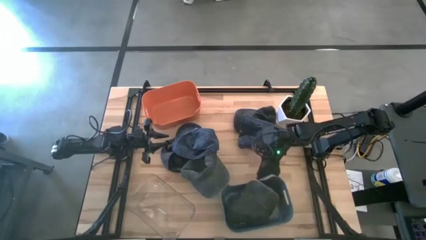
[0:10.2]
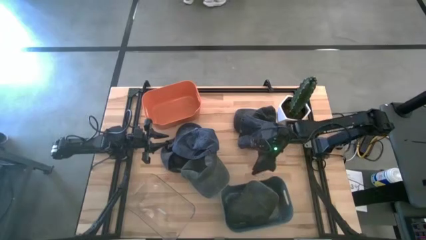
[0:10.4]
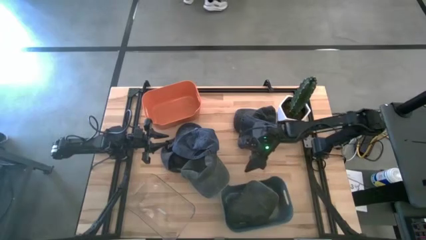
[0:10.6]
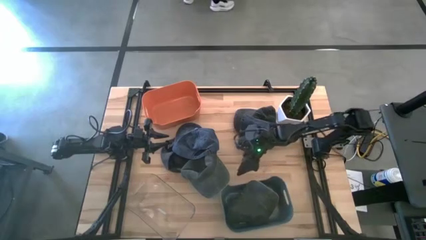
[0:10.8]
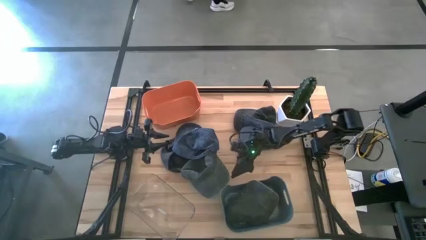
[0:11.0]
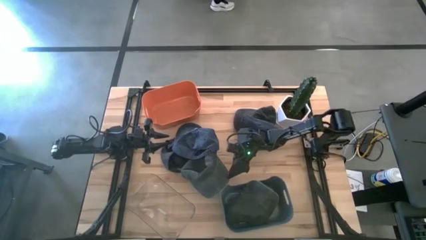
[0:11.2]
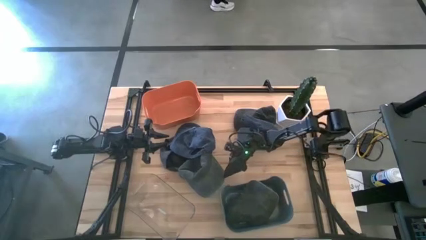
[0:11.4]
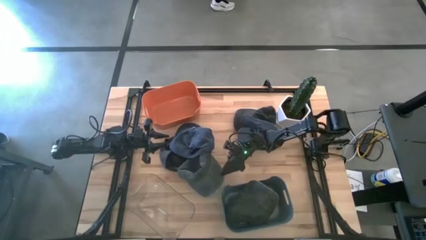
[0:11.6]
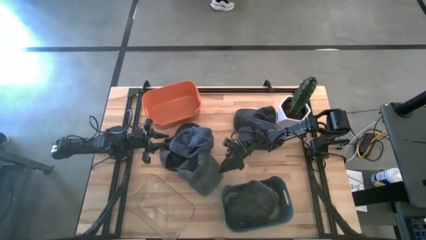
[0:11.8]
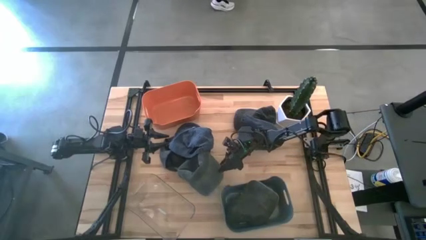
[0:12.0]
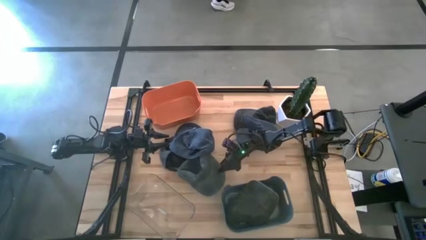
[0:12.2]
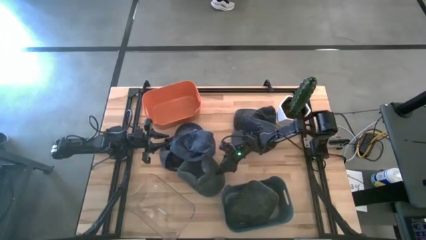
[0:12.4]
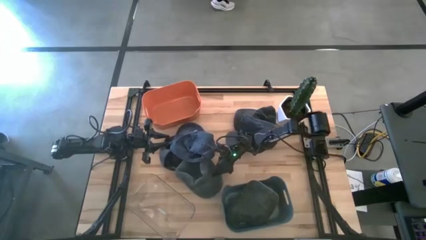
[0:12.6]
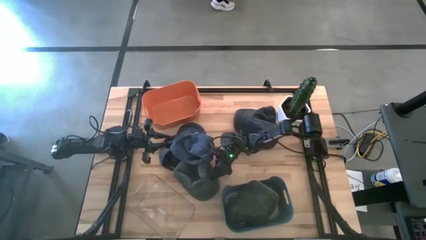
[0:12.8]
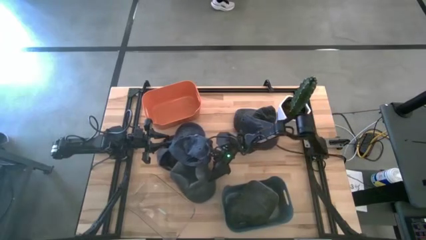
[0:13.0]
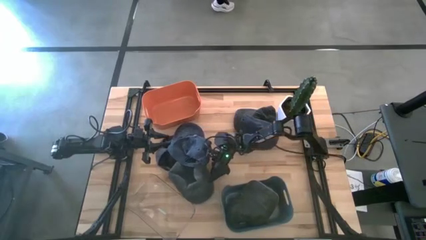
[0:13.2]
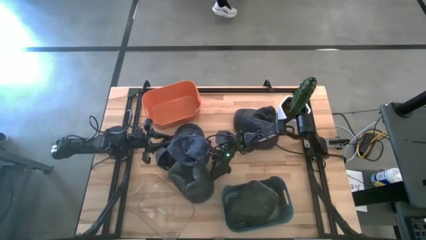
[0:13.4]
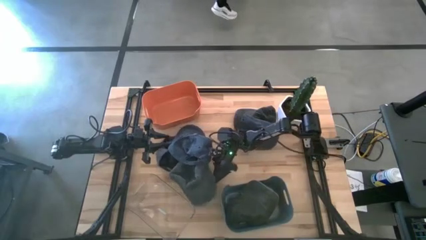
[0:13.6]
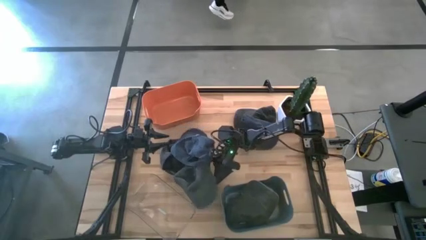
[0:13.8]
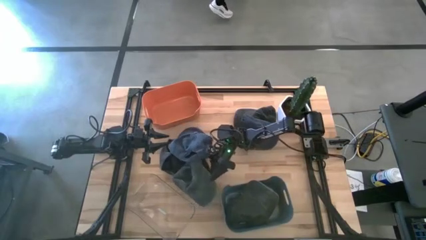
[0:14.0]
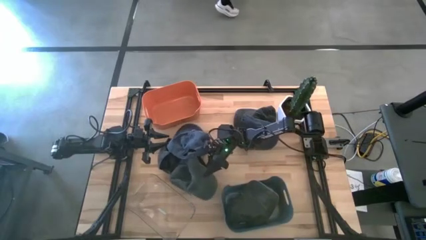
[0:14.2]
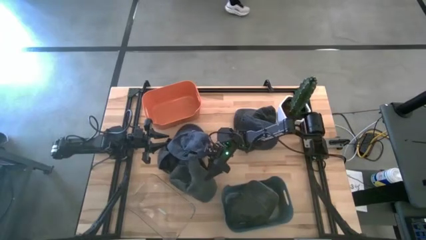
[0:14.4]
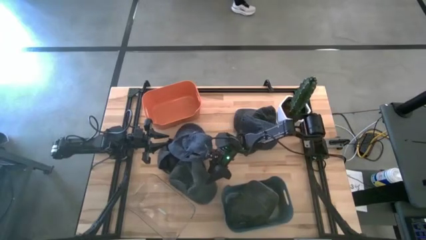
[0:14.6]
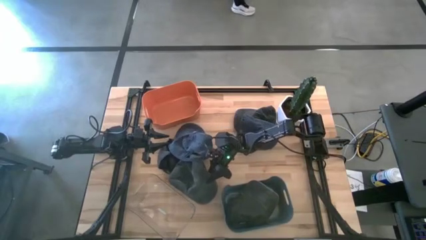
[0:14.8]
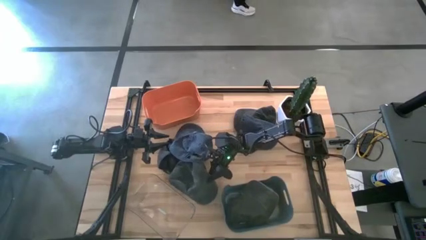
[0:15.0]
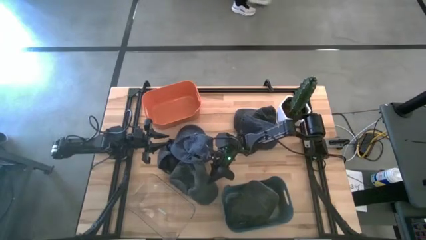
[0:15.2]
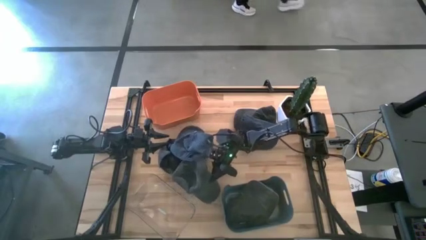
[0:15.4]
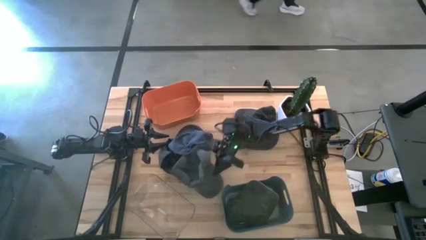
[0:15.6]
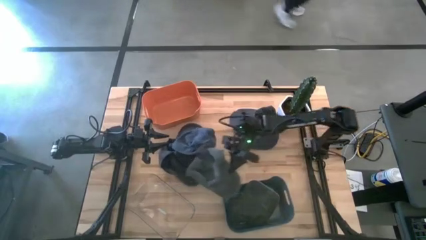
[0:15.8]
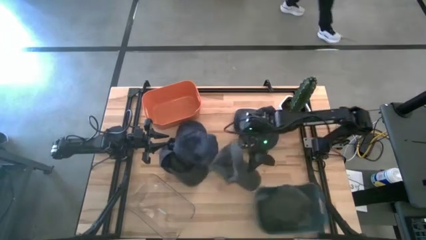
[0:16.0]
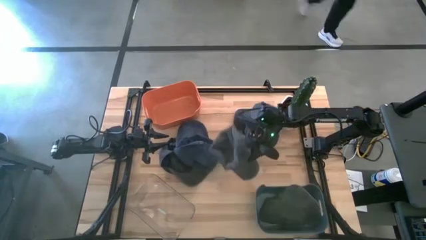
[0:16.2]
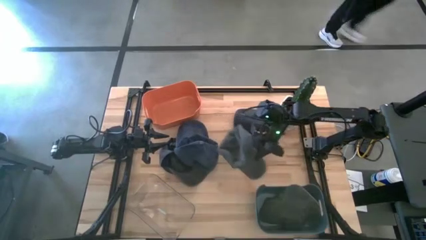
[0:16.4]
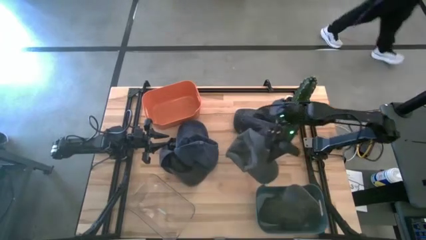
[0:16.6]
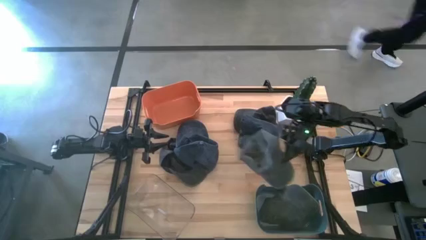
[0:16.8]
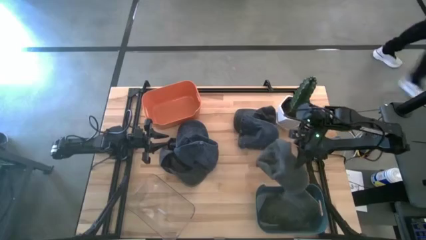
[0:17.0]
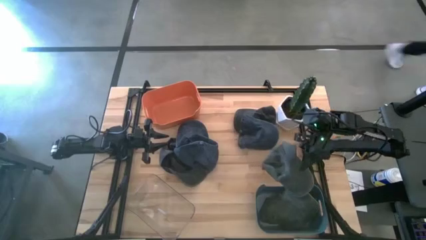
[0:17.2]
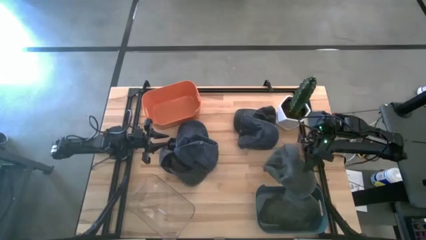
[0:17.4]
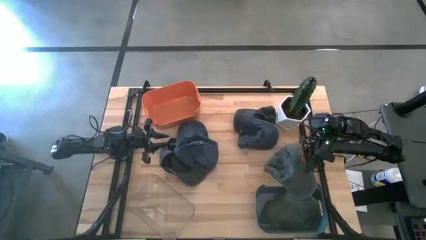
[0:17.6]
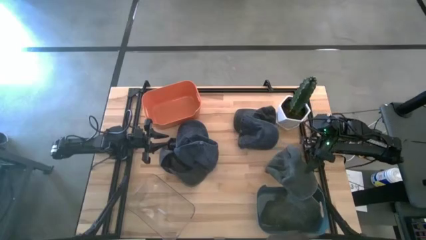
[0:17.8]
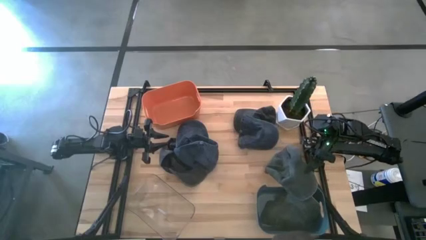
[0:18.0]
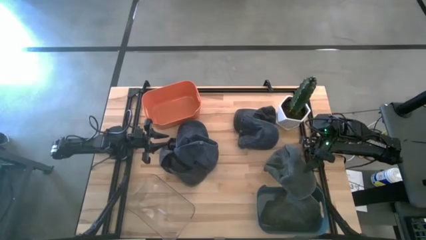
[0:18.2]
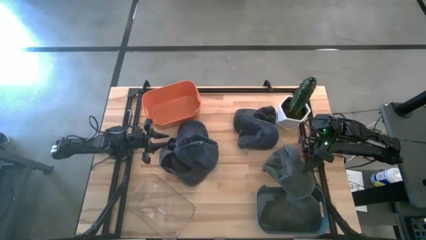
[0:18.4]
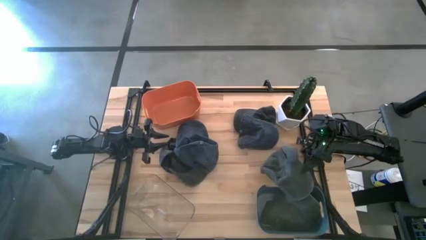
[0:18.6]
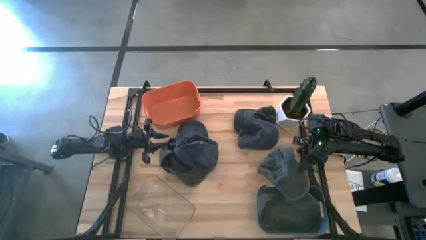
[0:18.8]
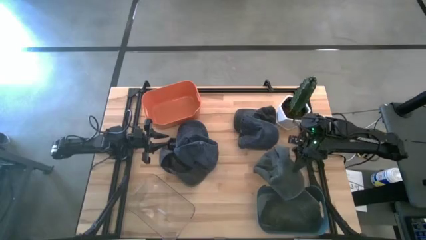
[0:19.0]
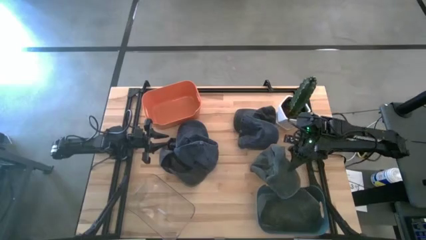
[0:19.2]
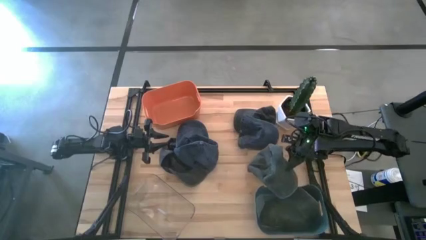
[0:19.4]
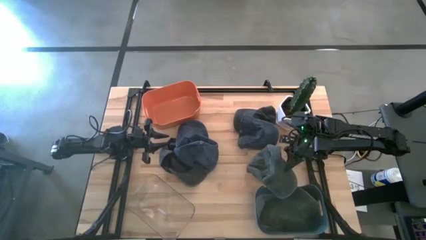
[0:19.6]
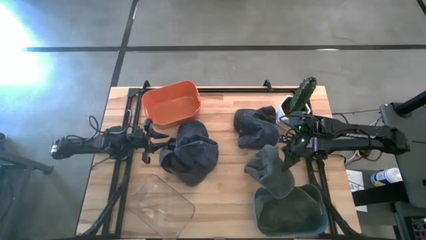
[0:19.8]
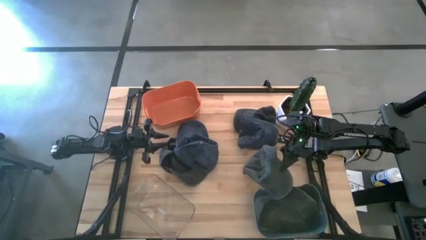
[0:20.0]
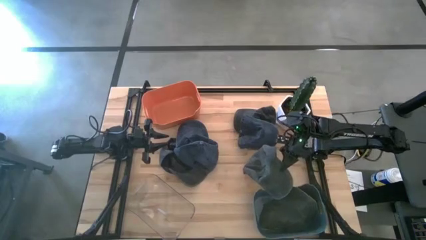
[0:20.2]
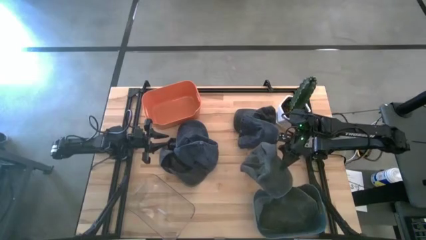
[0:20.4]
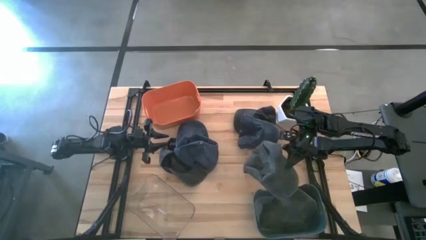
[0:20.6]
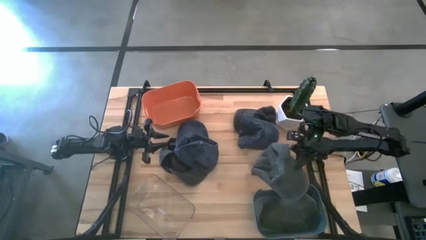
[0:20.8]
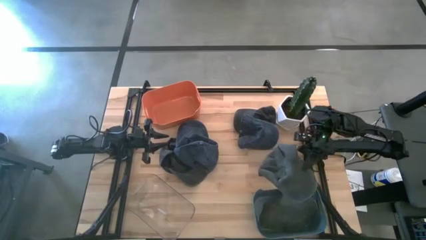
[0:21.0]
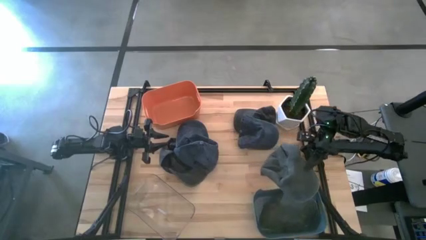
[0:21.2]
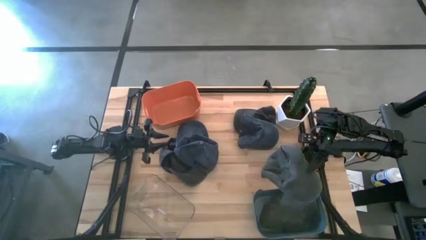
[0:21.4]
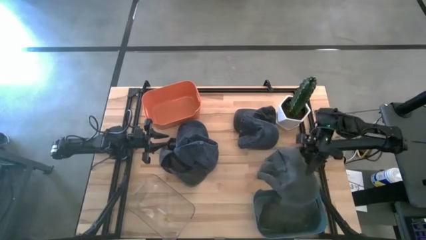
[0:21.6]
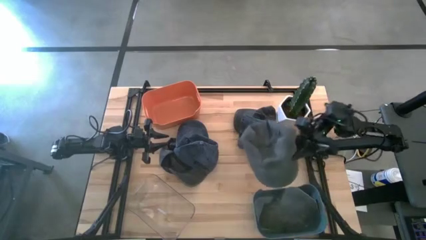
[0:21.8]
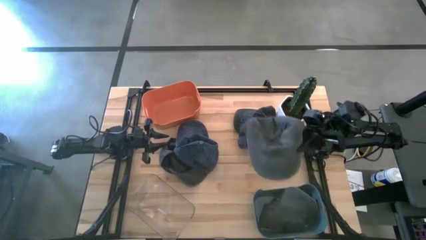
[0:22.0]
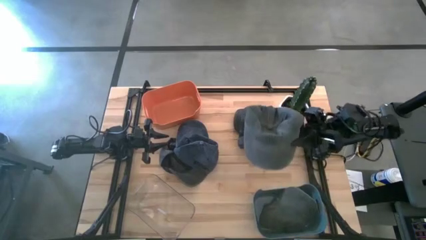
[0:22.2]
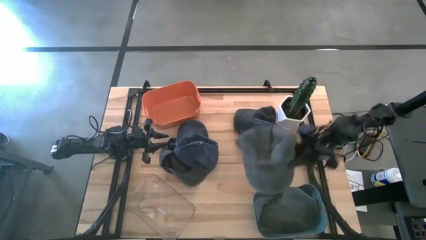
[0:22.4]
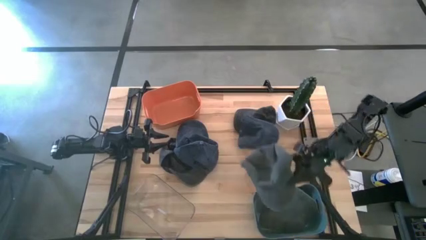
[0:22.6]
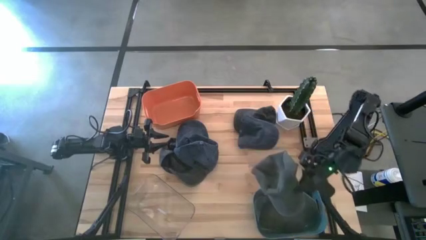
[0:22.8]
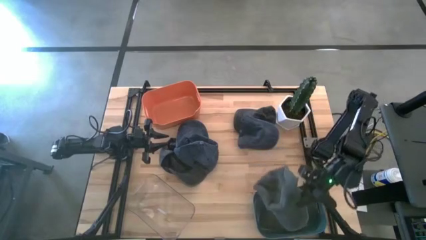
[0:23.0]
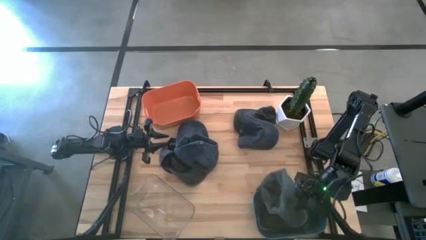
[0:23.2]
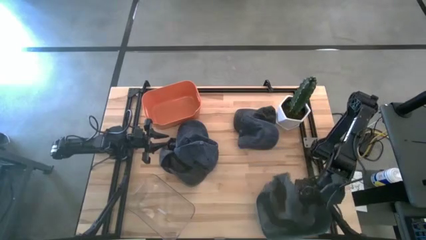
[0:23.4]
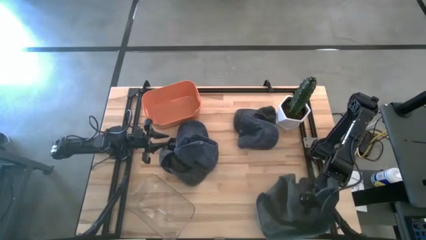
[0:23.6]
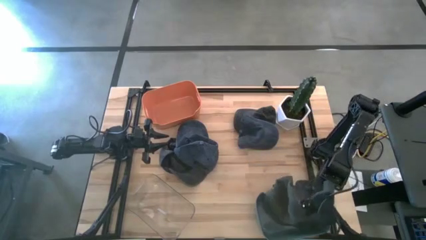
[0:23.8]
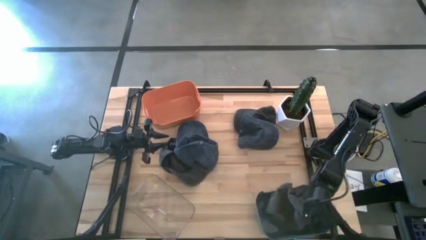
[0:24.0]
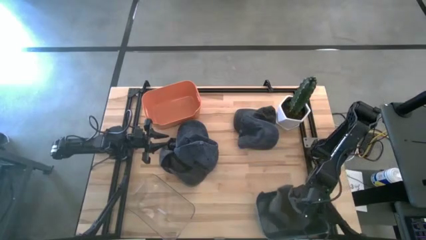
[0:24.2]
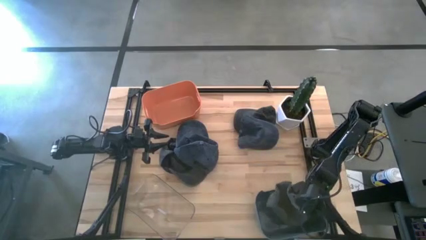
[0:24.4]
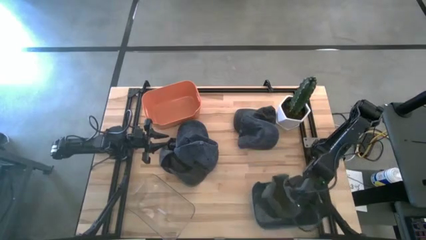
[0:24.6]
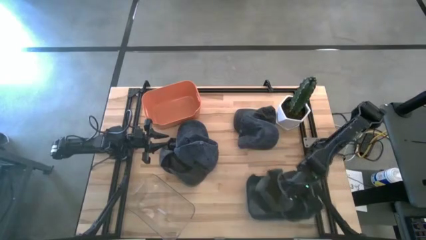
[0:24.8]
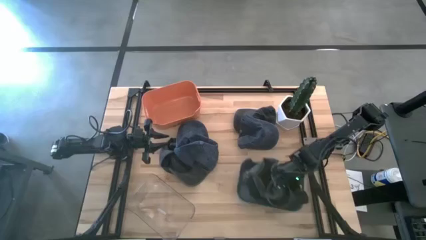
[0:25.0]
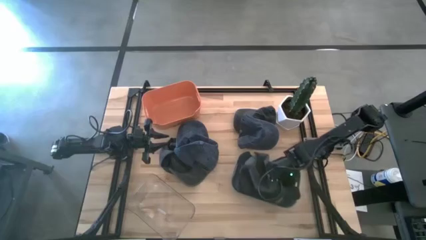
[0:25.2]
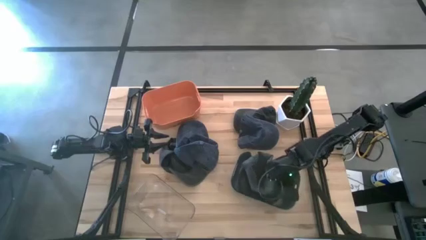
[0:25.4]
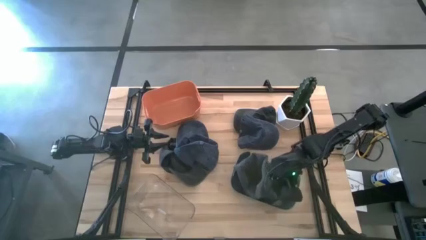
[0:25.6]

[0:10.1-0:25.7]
Task: Pick & Place hat
Put the gray cap into the blue bin

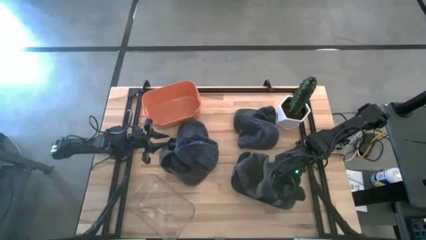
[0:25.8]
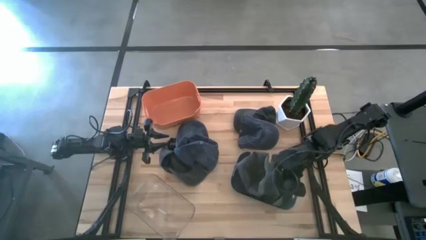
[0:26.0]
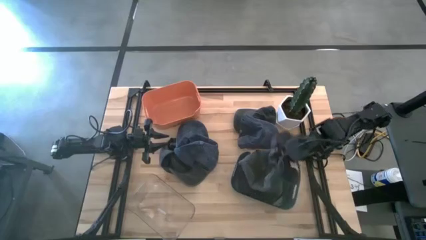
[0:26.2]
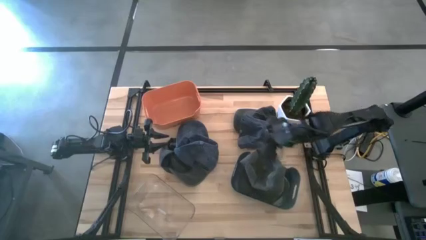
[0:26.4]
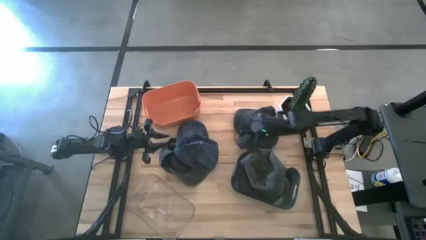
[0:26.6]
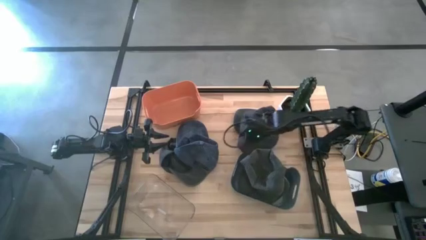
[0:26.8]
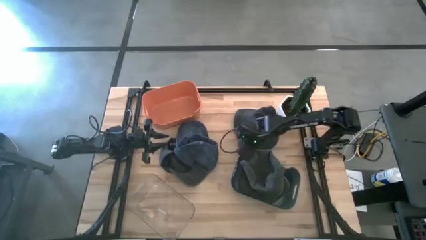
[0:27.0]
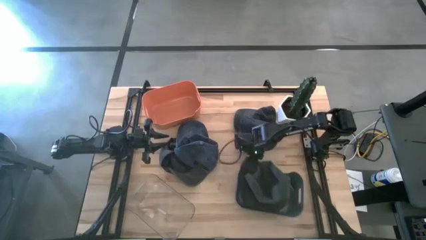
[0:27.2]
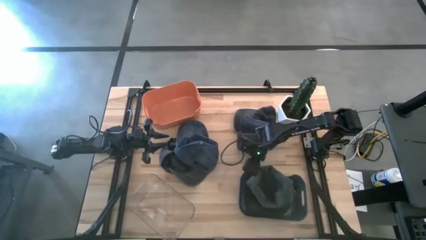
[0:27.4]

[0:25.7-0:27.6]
Adjust the blue bin
